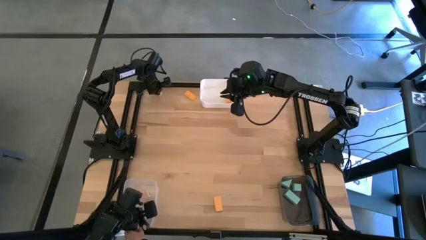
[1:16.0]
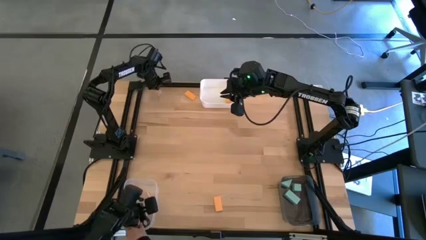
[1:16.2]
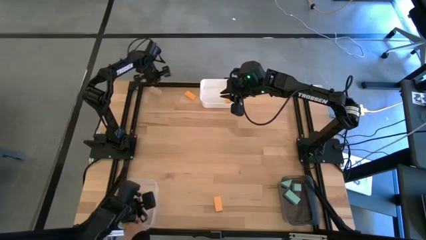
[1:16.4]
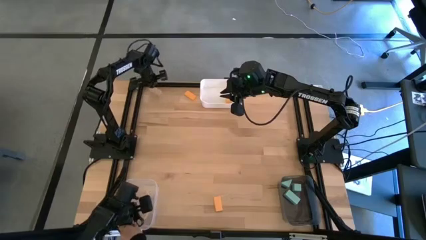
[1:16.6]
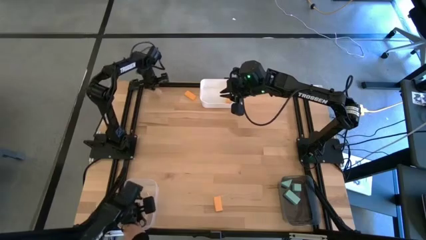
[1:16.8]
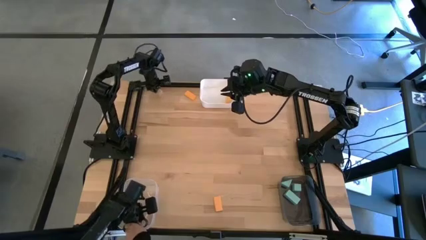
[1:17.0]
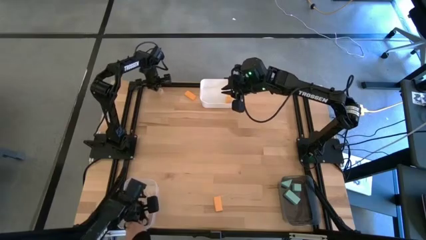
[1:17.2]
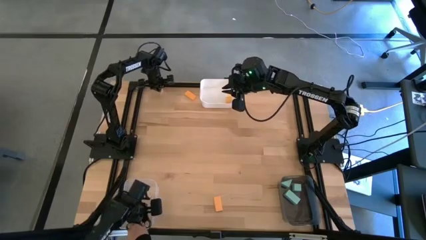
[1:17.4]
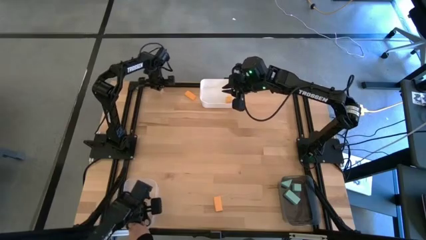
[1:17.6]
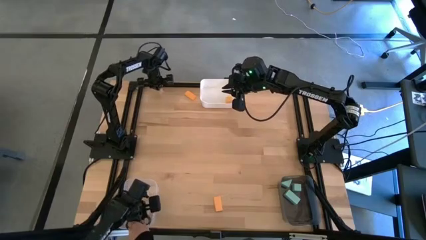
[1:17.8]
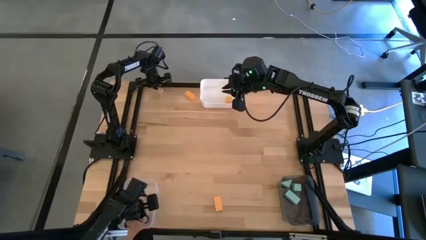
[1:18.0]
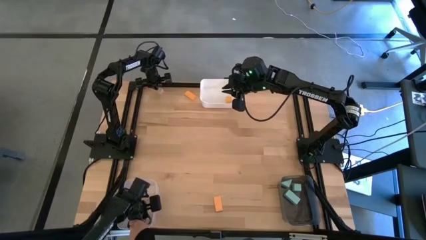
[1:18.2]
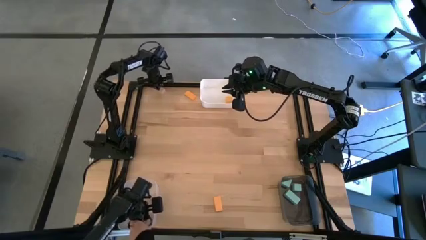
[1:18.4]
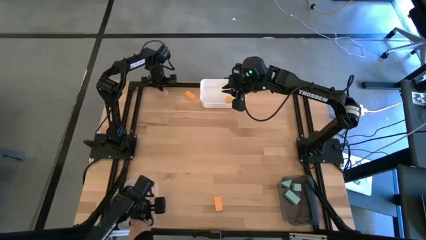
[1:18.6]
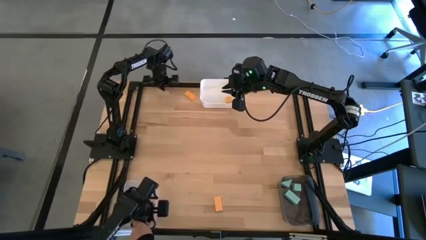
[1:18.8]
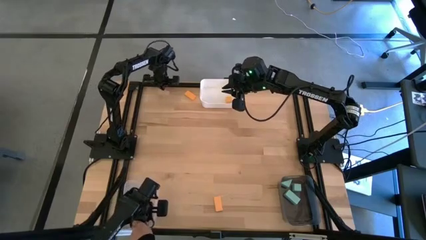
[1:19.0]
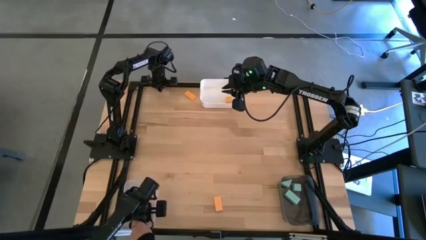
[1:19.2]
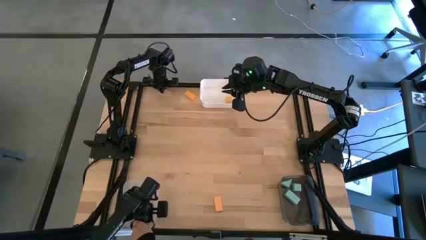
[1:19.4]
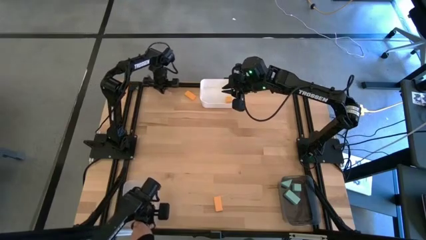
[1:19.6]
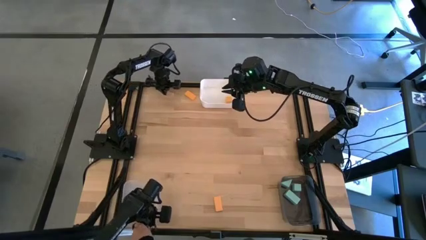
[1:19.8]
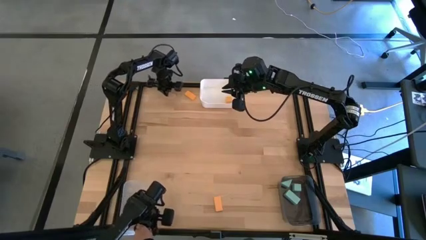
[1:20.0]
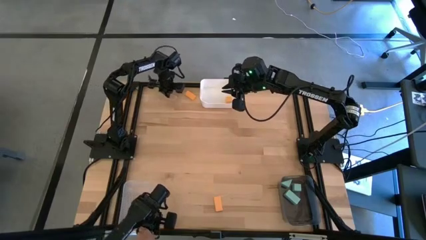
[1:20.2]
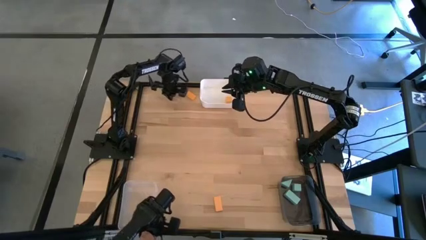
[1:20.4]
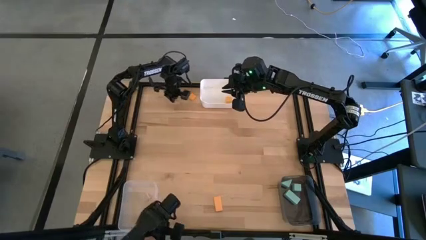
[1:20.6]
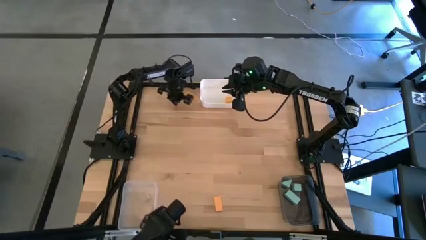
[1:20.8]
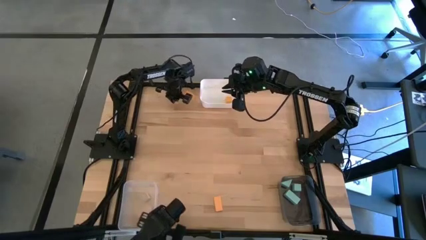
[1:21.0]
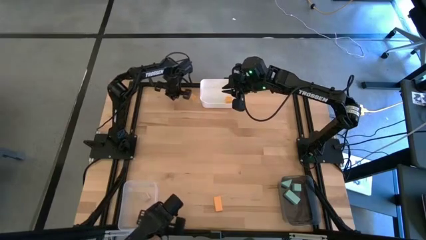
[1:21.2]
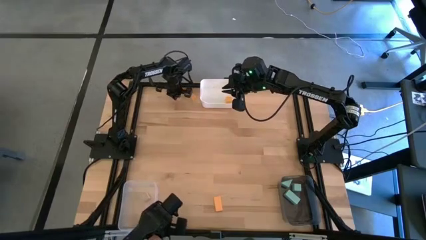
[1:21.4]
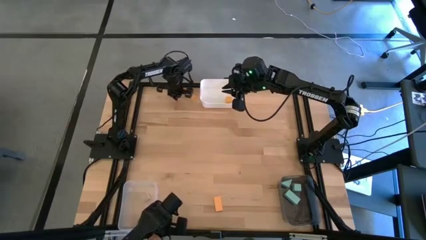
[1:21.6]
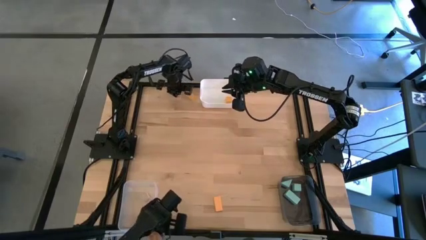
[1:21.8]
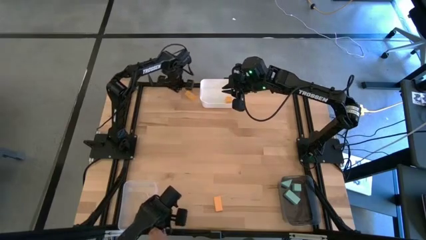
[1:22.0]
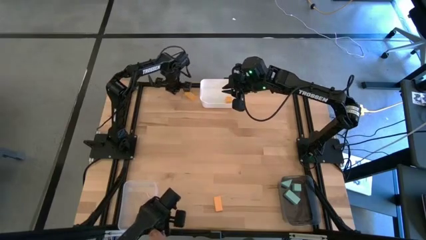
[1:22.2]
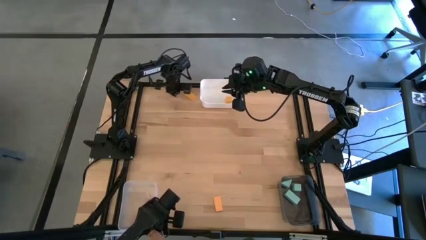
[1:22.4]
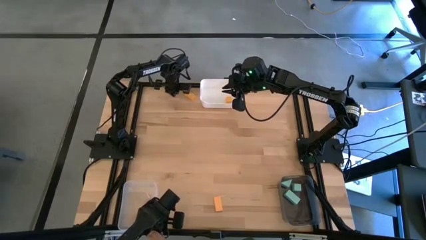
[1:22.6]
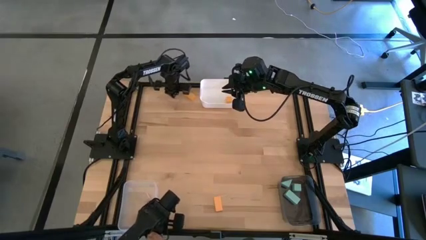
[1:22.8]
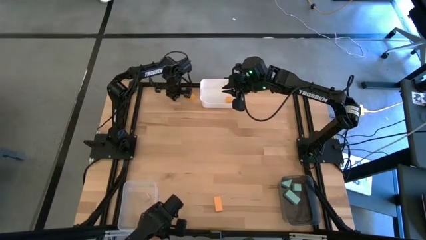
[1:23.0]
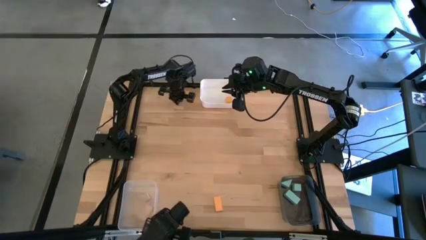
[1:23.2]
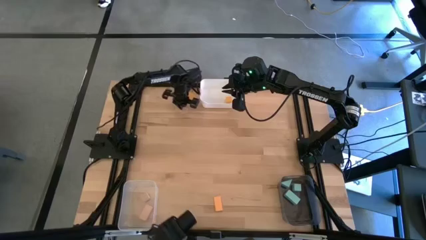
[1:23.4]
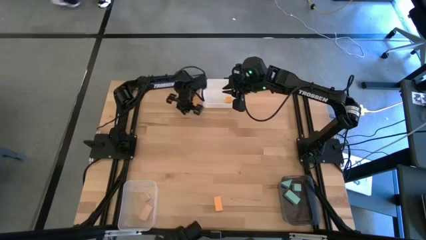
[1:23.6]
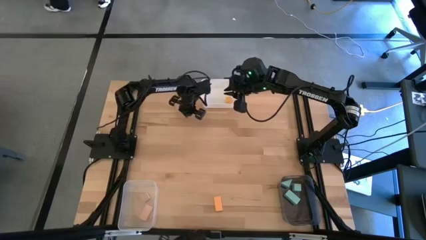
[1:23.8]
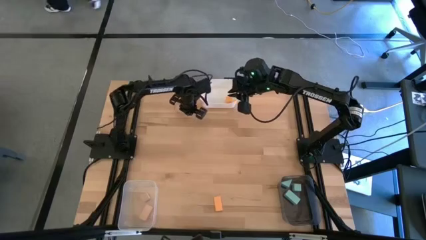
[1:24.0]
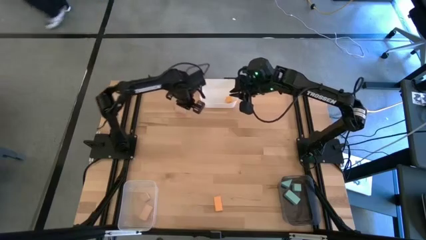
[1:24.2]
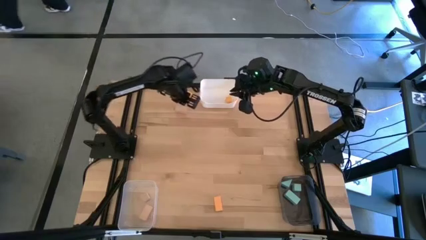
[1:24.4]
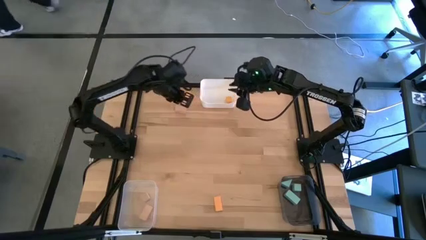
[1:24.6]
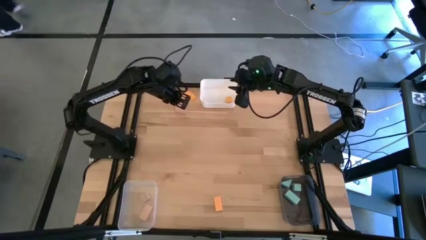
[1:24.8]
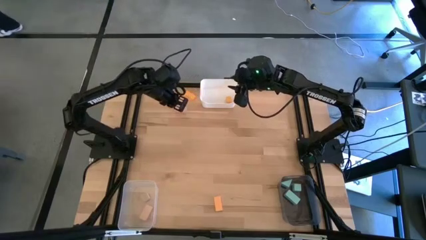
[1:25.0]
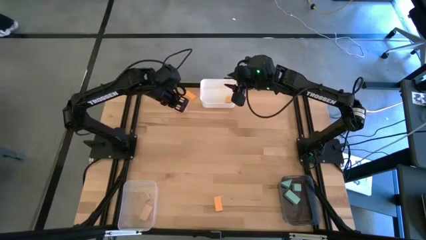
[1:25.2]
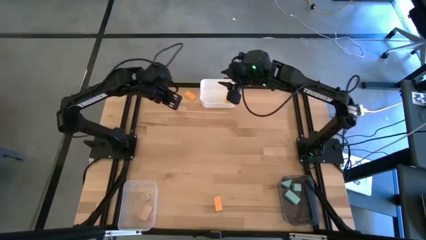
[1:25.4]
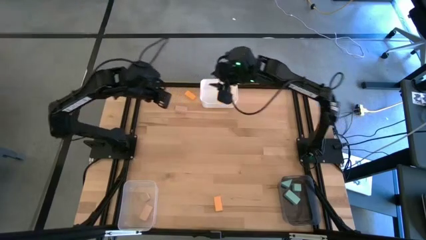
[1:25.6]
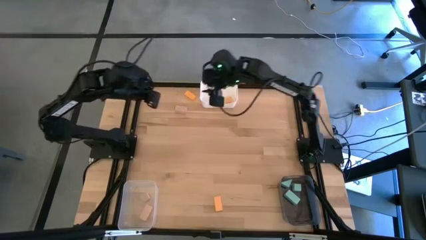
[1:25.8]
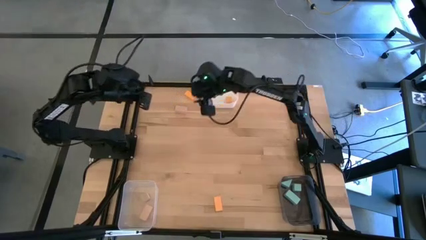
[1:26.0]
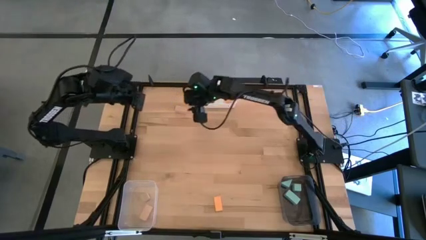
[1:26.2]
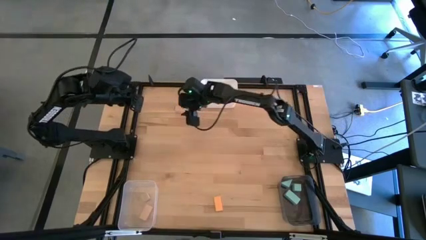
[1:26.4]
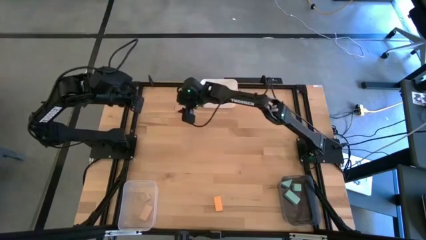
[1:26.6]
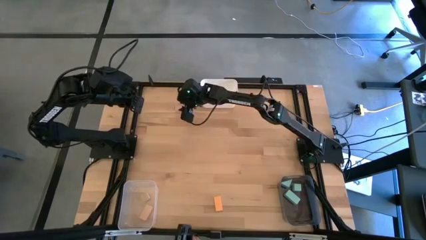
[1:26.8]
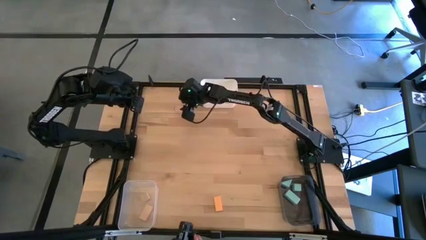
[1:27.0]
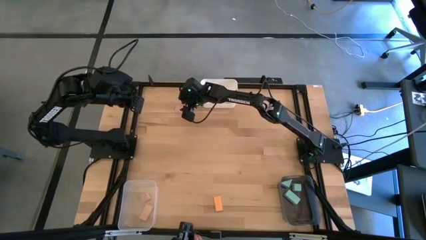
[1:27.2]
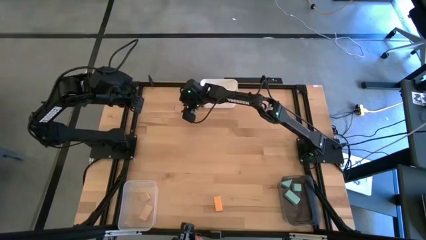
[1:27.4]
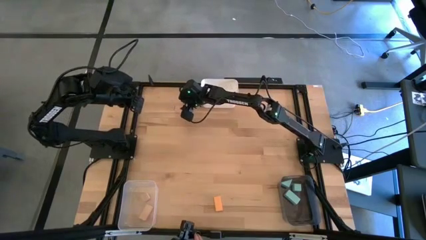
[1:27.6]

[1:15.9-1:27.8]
Task: Sort & place blocks by color
Put the white block into the transparent bin

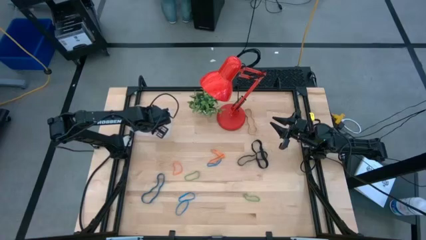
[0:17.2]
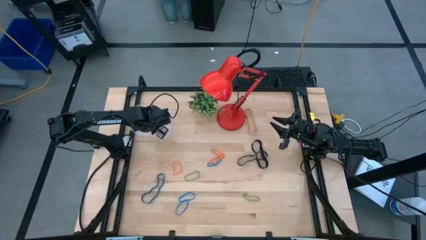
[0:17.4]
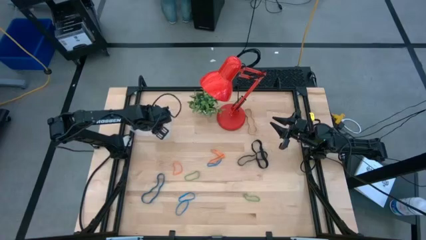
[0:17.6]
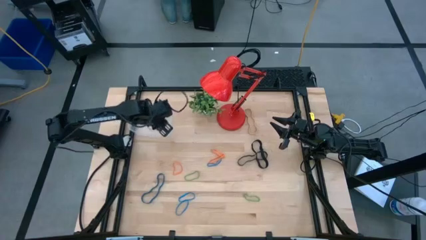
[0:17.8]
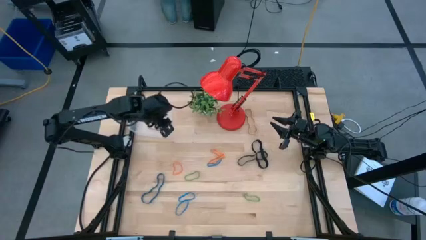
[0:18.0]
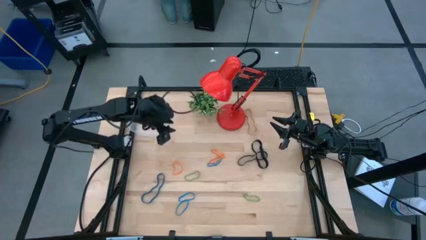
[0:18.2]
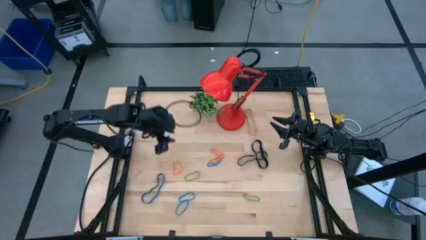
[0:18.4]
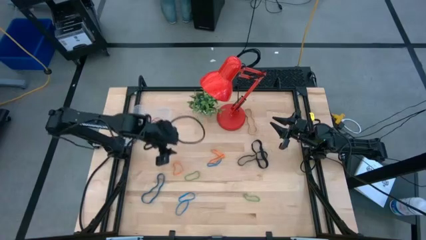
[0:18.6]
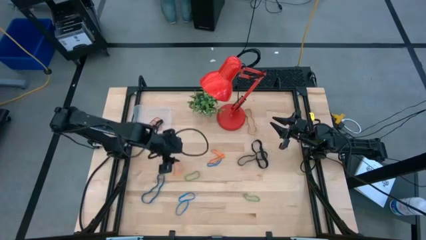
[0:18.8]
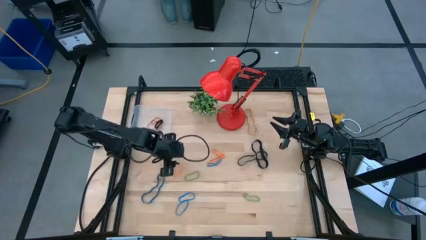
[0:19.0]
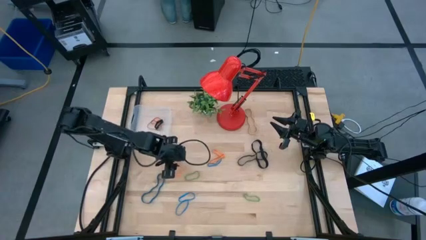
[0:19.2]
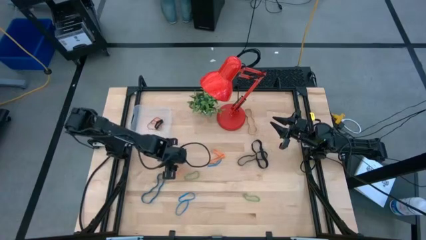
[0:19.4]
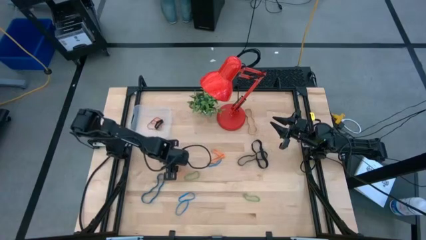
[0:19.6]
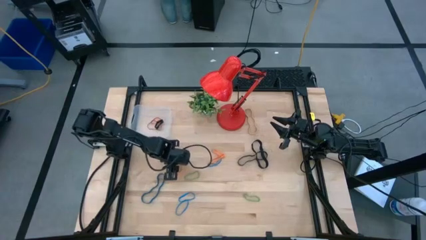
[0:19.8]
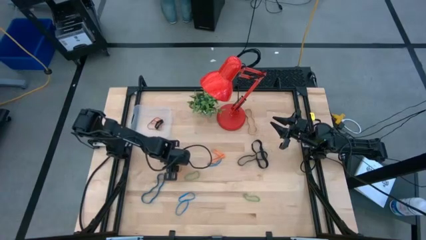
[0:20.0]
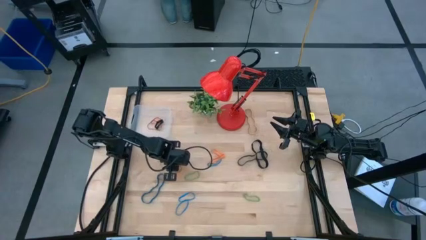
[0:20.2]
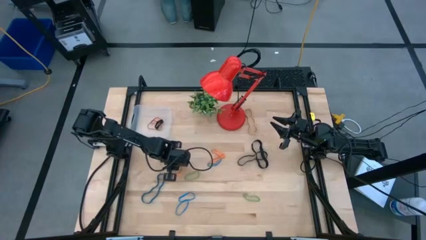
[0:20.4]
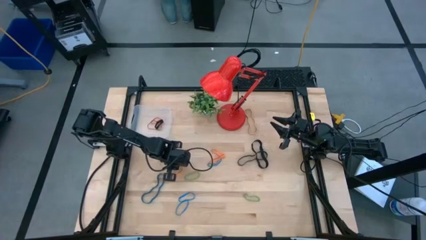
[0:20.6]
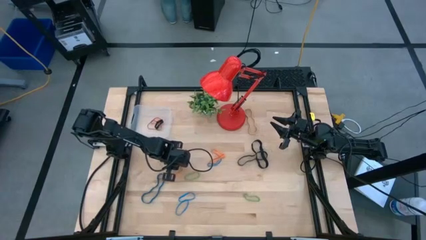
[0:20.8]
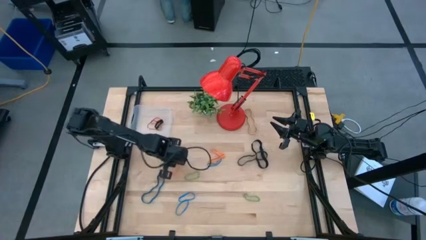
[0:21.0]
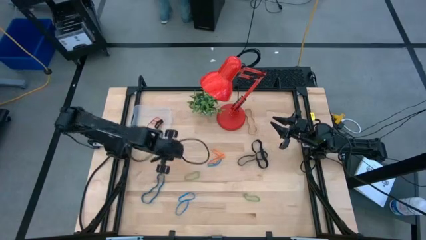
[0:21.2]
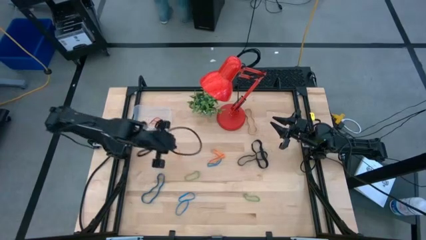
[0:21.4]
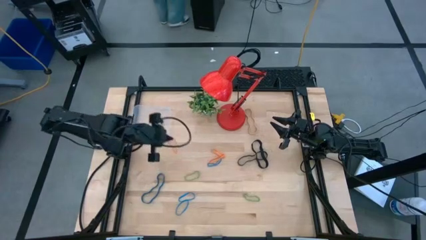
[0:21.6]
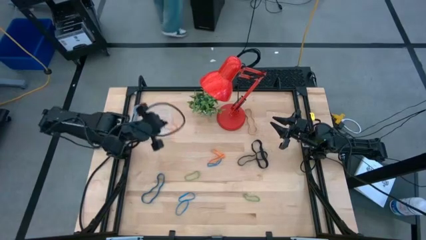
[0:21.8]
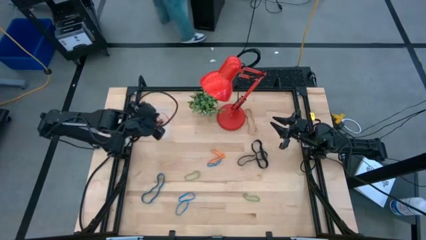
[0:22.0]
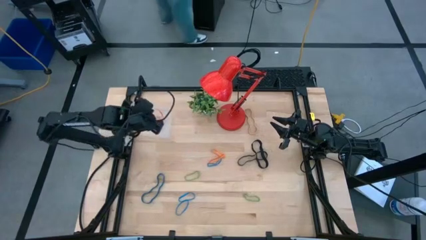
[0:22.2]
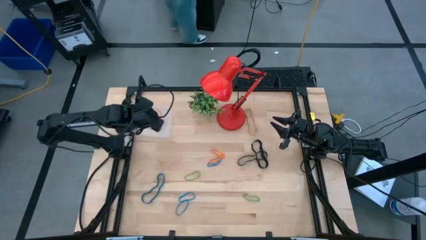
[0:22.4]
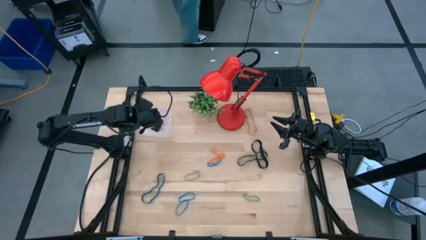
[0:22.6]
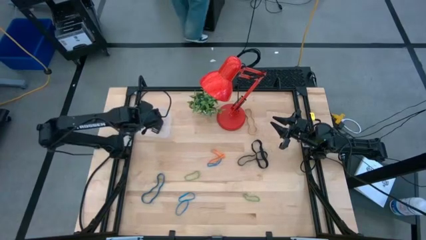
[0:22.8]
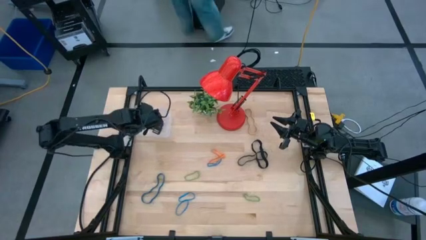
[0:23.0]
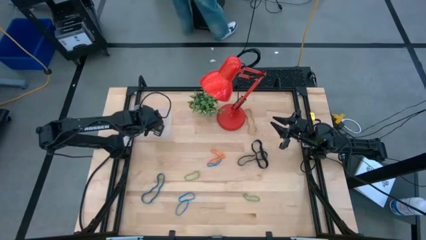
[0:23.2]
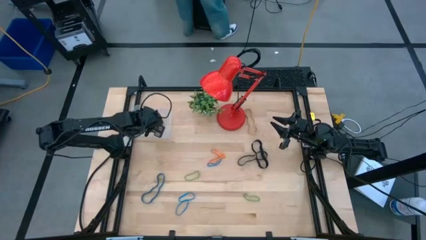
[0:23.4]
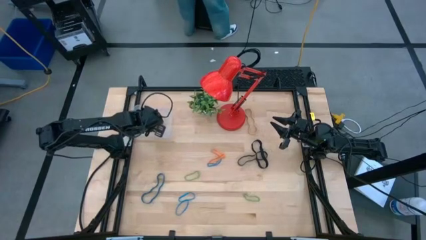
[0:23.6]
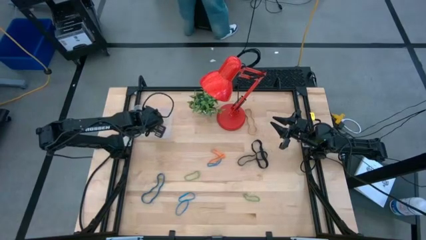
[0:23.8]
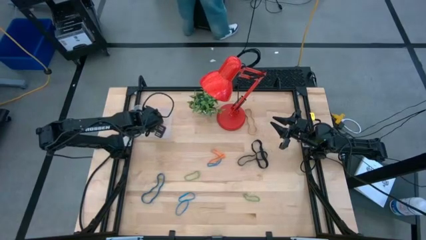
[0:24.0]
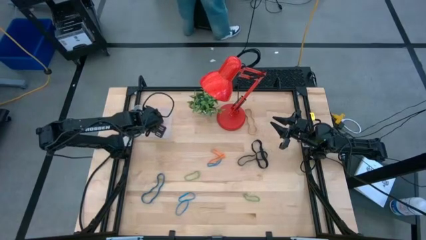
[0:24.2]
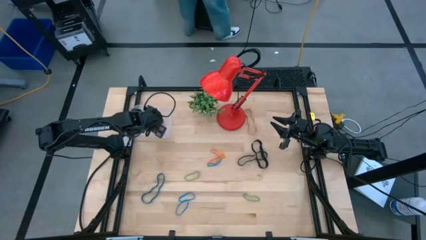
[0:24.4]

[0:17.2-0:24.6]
Task: Pick and place rubber bands into bin
Put the orange rubber band into the transparent bin
